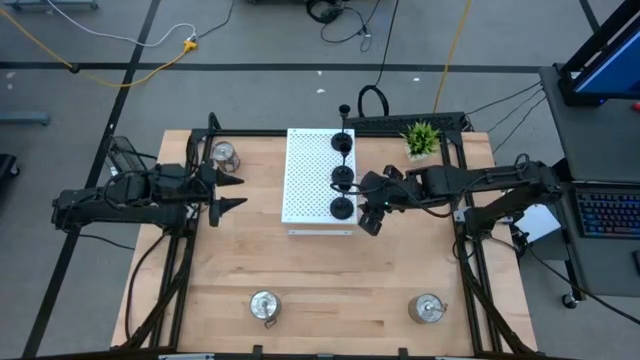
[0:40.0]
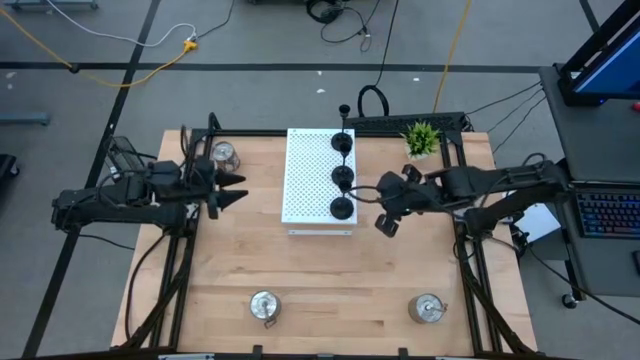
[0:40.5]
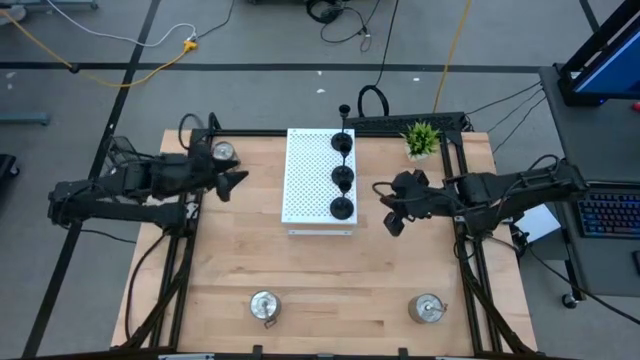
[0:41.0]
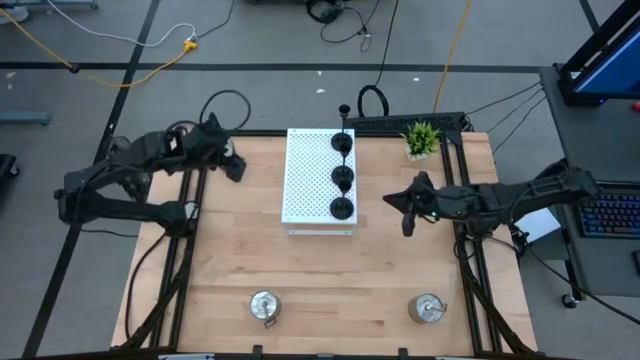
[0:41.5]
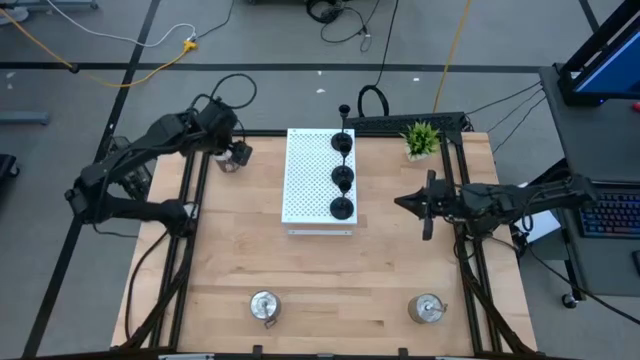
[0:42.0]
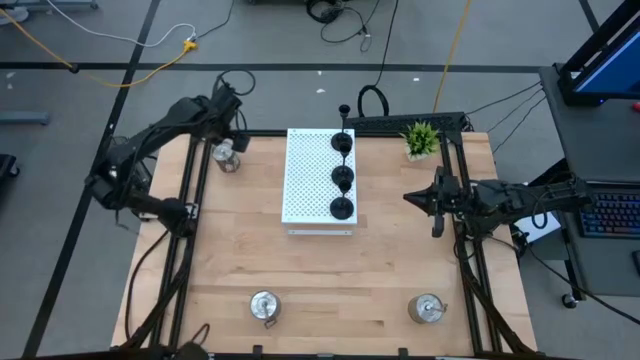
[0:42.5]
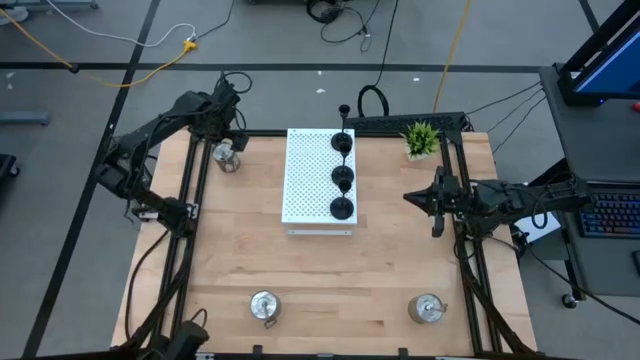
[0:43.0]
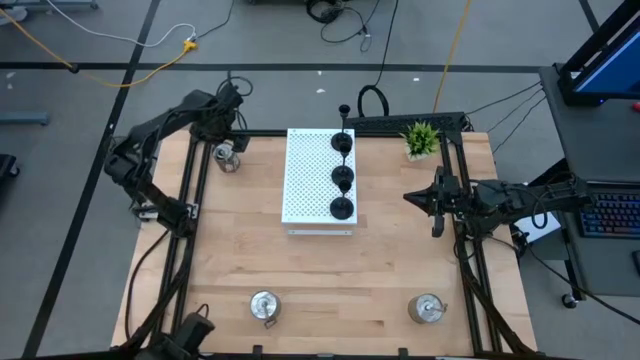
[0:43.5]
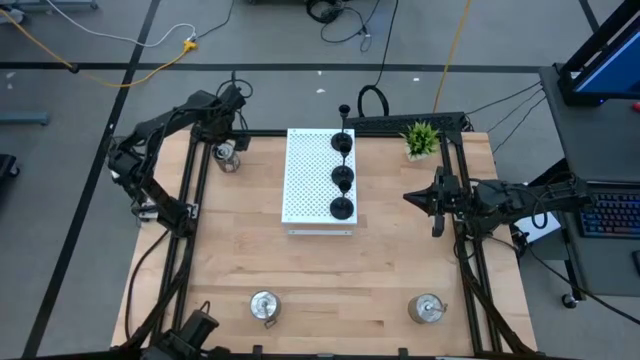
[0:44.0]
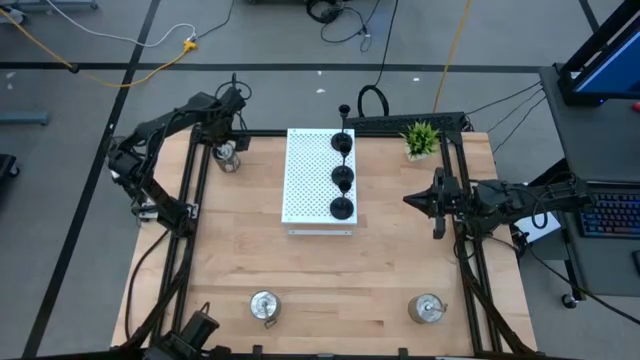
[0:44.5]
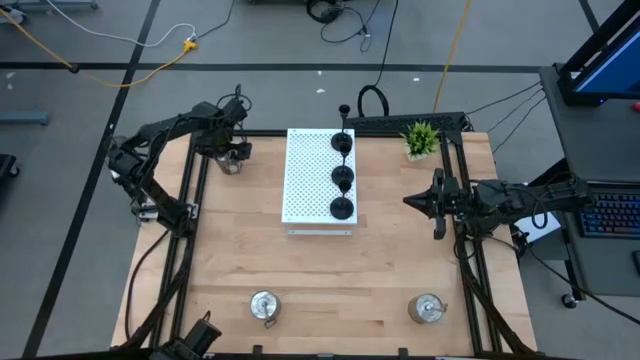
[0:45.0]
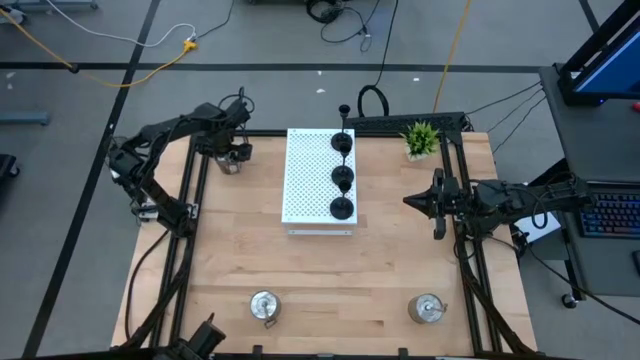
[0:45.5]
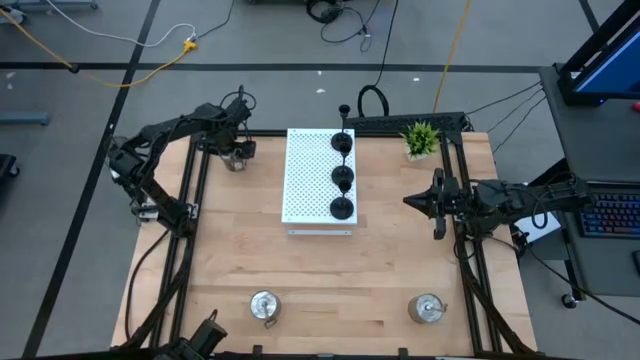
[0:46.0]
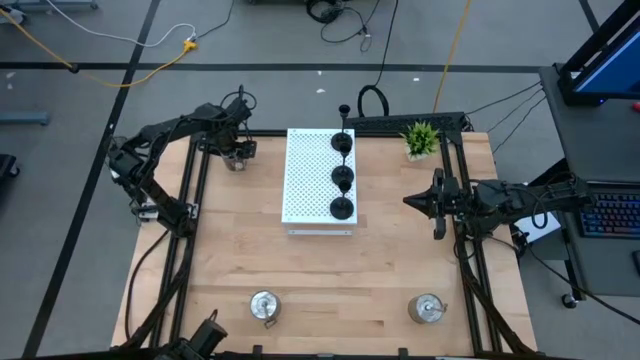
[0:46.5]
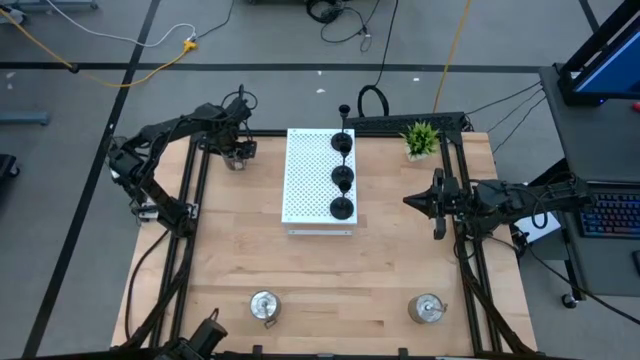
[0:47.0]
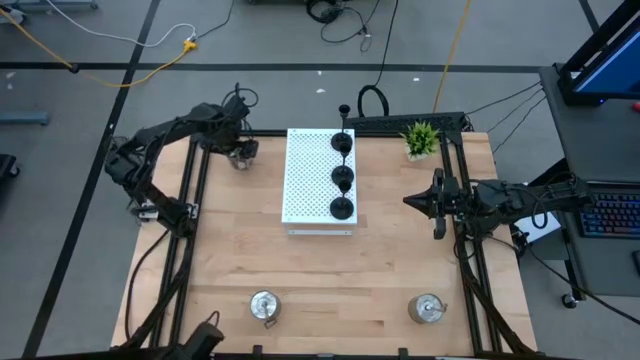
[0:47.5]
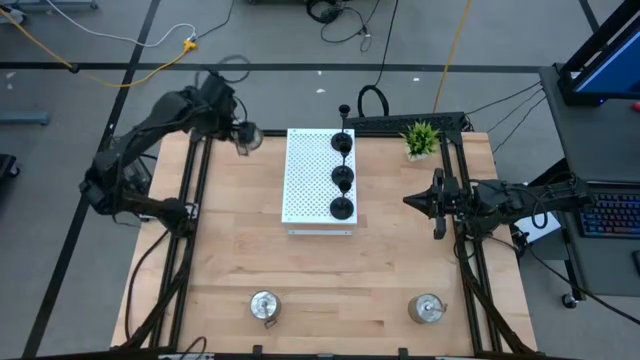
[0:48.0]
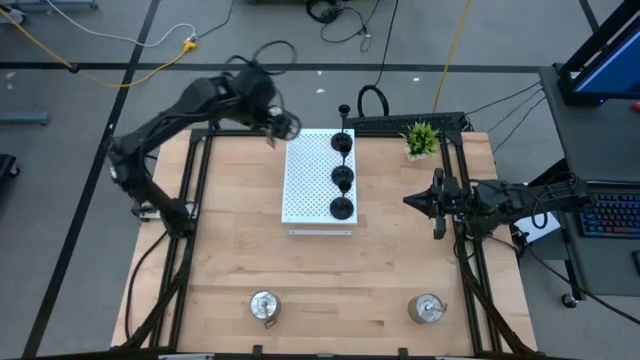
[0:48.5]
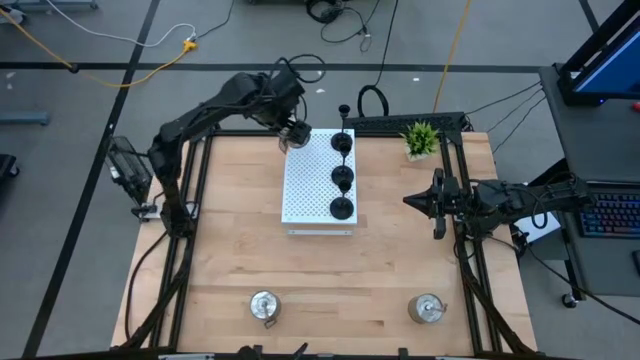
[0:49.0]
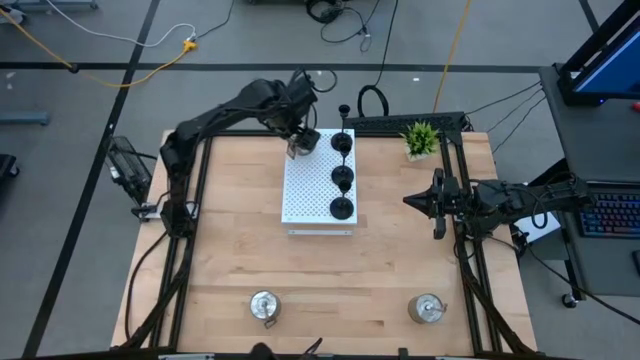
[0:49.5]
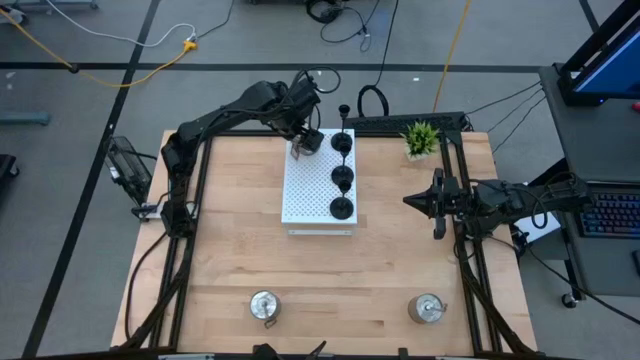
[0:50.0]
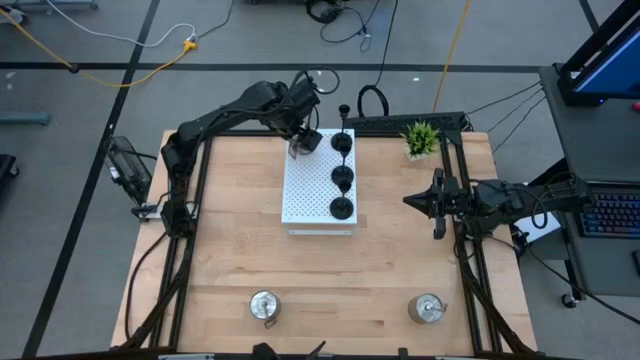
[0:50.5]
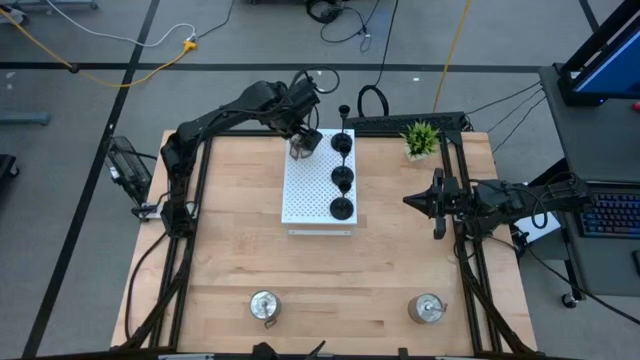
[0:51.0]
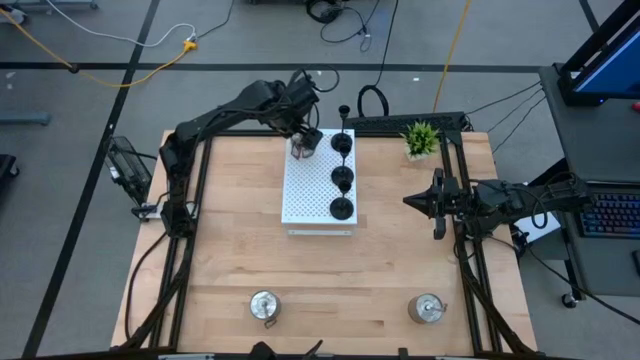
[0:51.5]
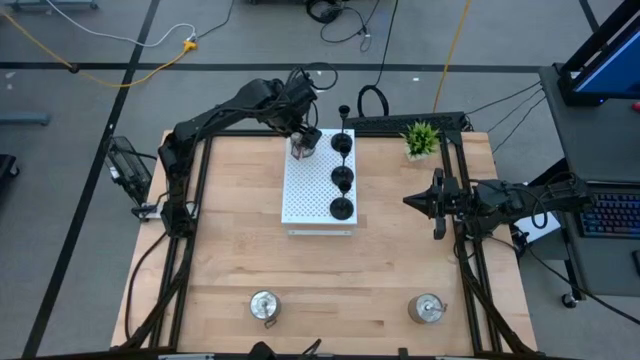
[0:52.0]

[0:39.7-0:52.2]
Task: Pick & Place candle stick holders
Put the top silver scented candle on the shelf

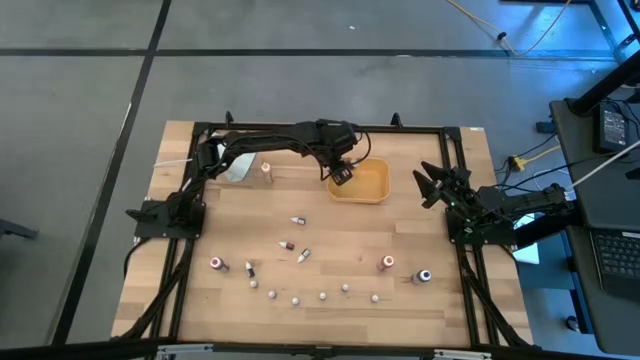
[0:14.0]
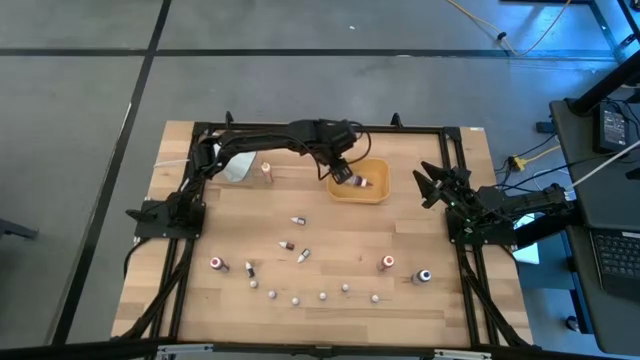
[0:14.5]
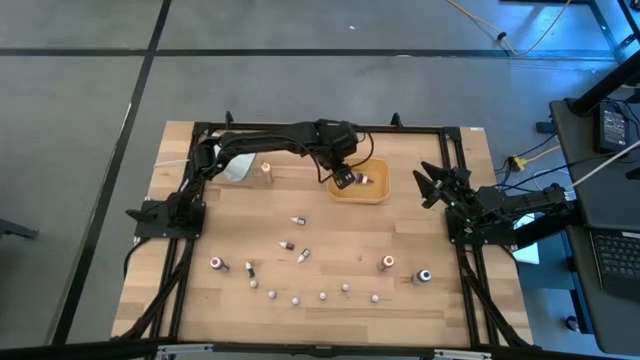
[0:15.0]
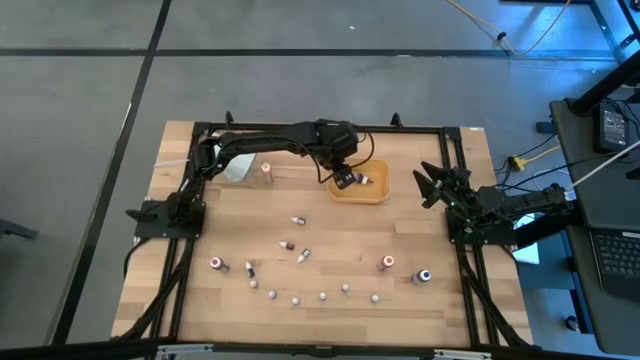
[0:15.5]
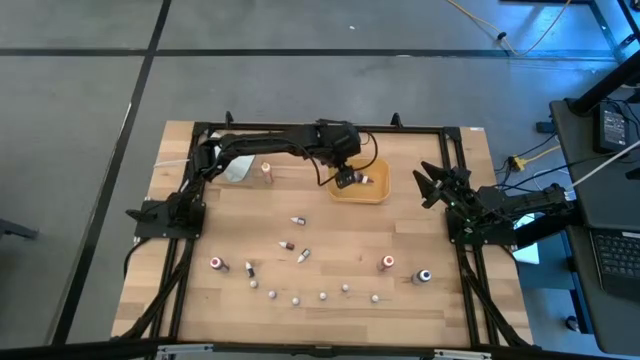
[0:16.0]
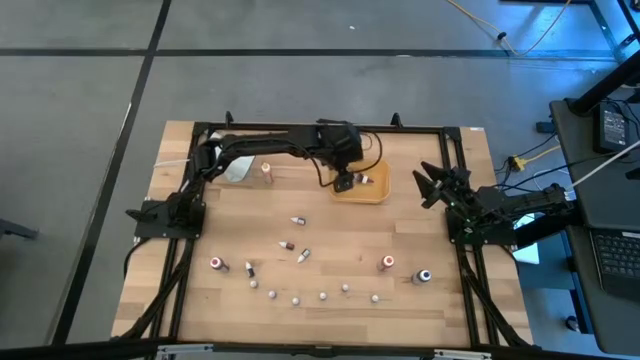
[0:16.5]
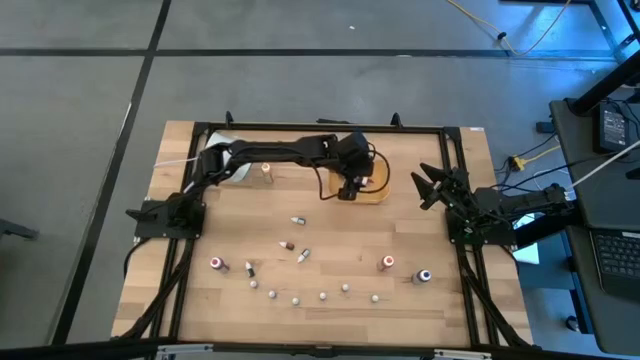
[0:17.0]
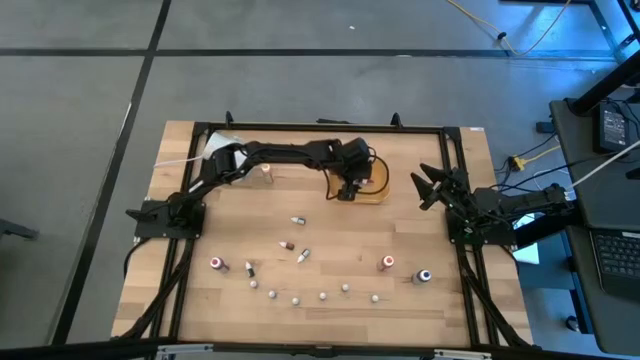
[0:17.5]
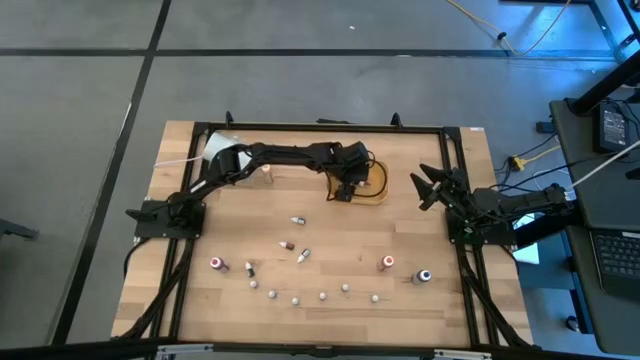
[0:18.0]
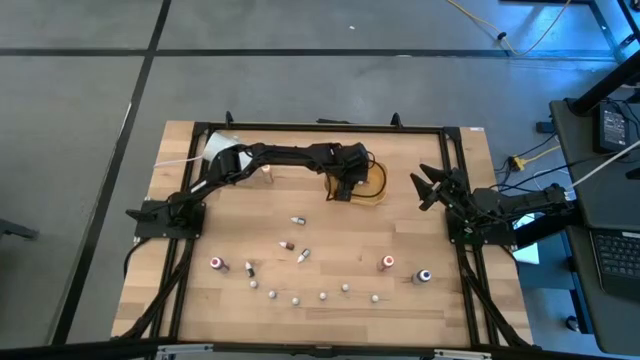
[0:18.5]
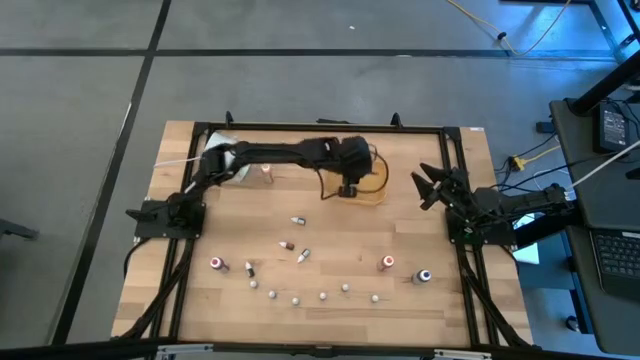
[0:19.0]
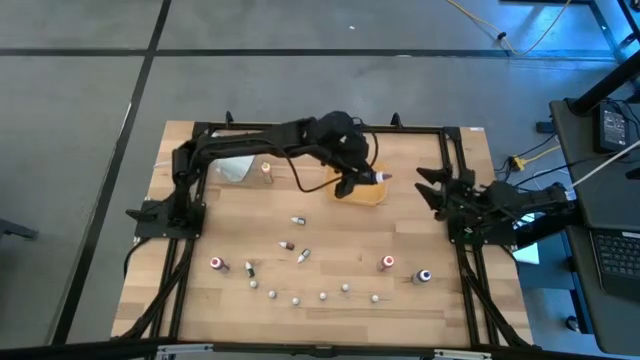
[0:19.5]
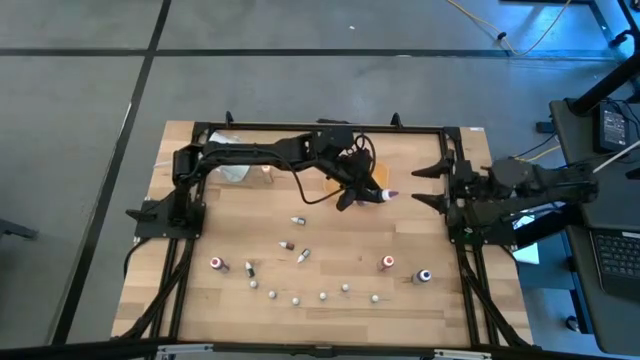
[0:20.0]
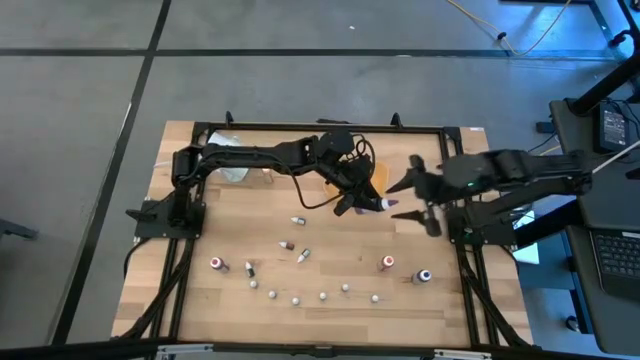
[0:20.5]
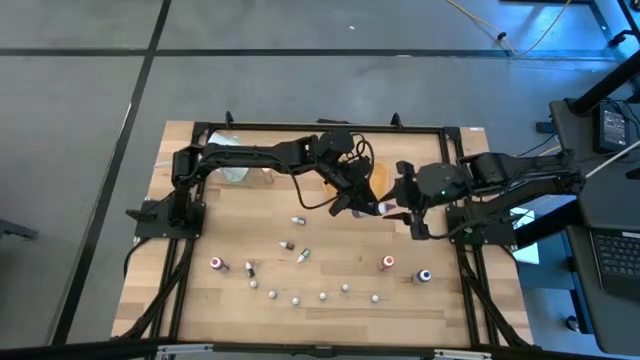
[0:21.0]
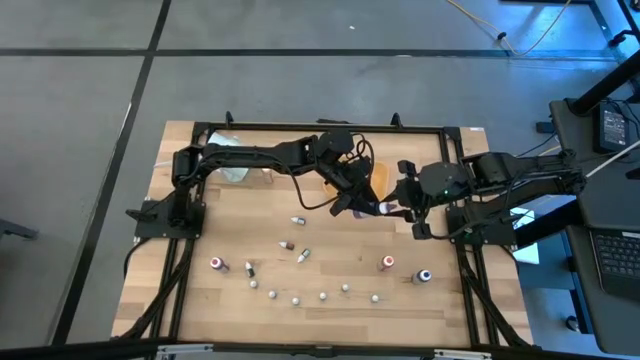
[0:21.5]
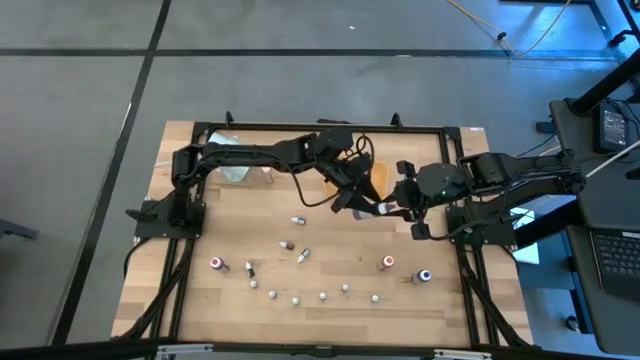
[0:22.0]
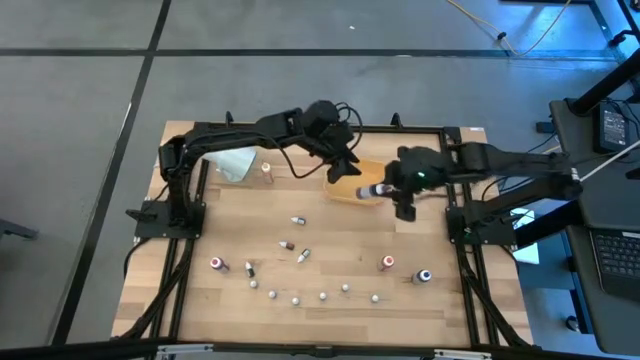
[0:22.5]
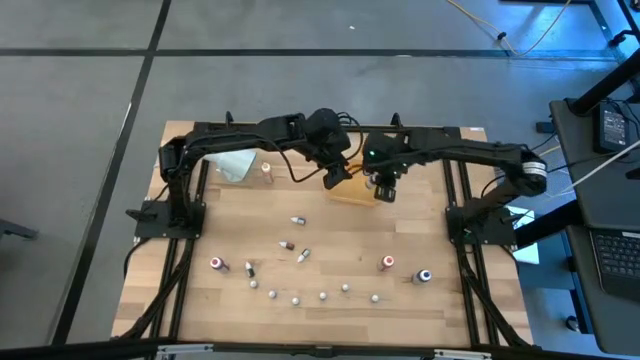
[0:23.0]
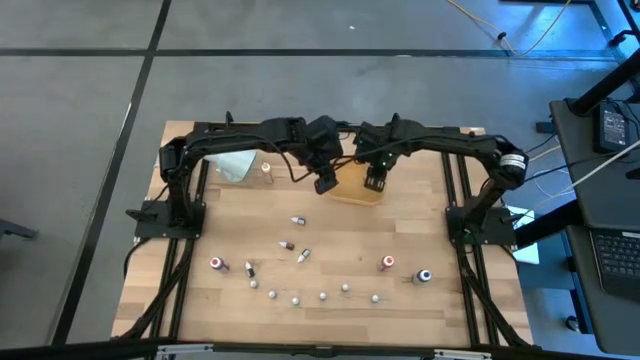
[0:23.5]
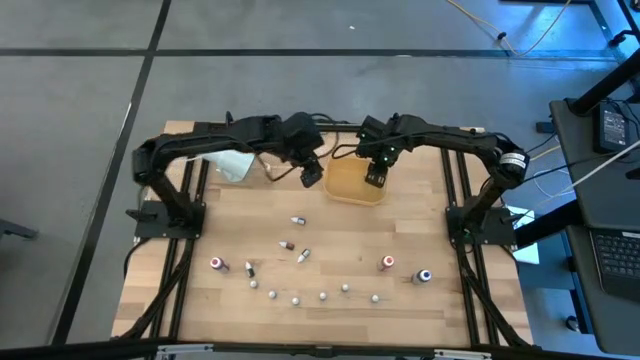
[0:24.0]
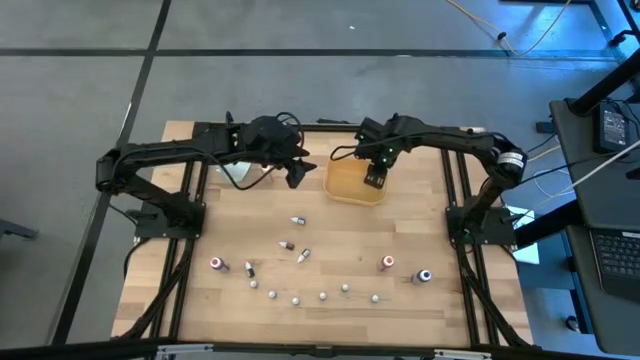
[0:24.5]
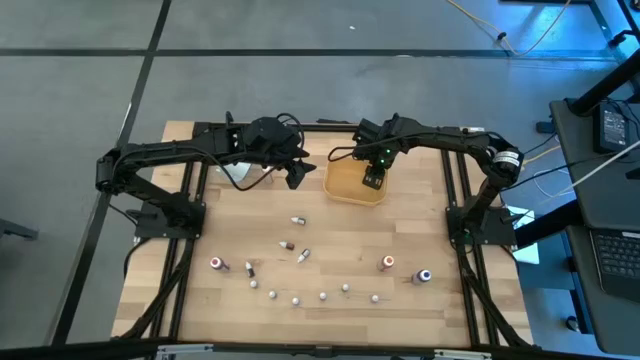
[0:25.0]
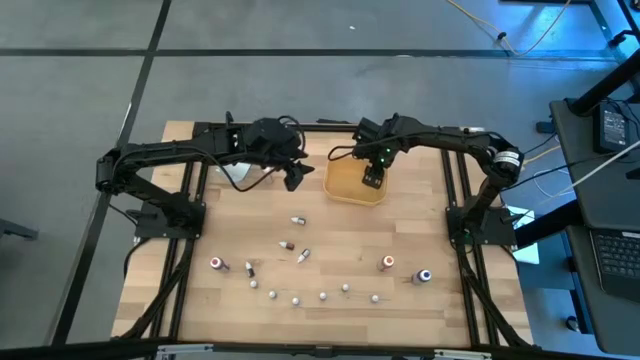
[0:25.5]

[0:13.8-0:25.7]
Task: Pick & Place food coloring
Put the large violet food coloring bottles into the yellow bin
